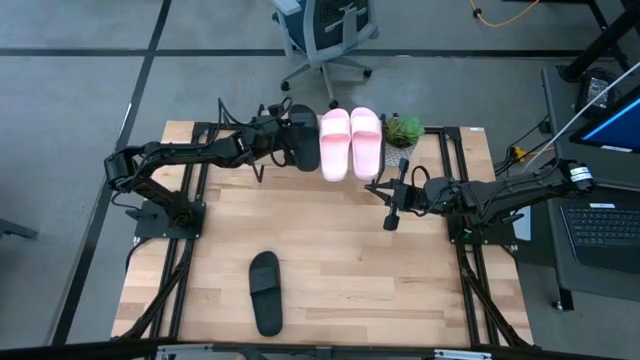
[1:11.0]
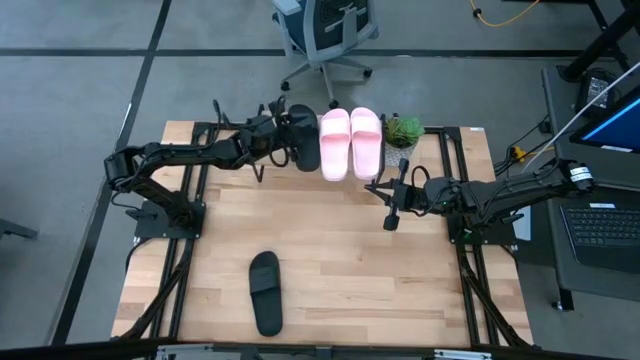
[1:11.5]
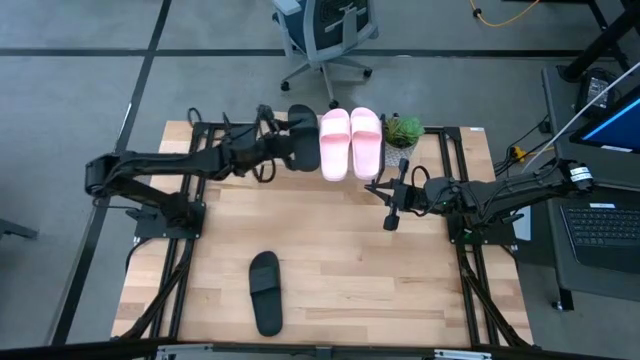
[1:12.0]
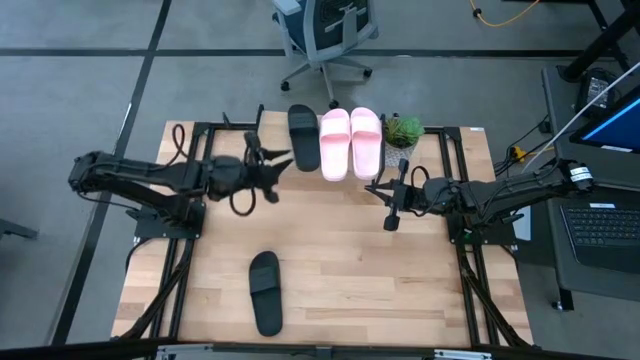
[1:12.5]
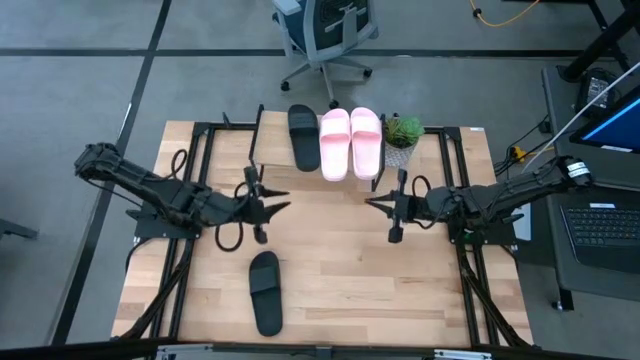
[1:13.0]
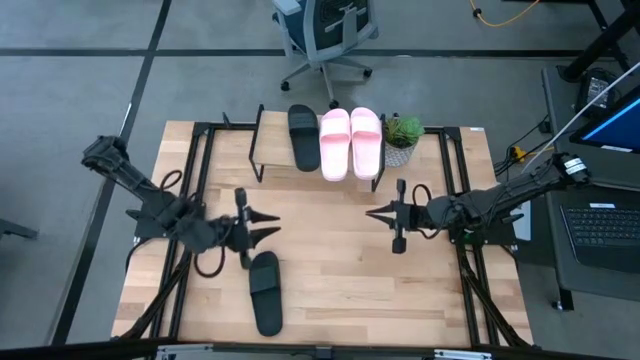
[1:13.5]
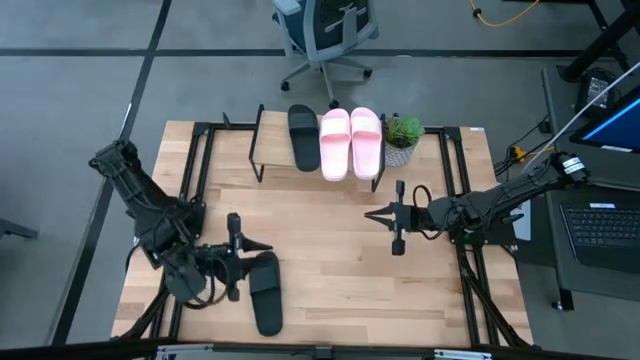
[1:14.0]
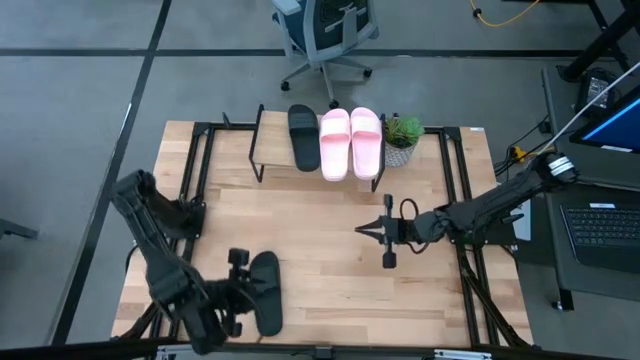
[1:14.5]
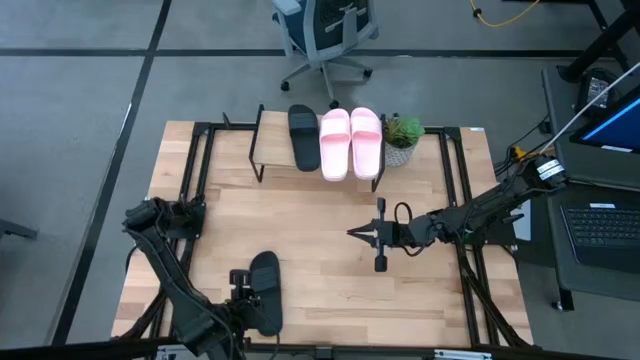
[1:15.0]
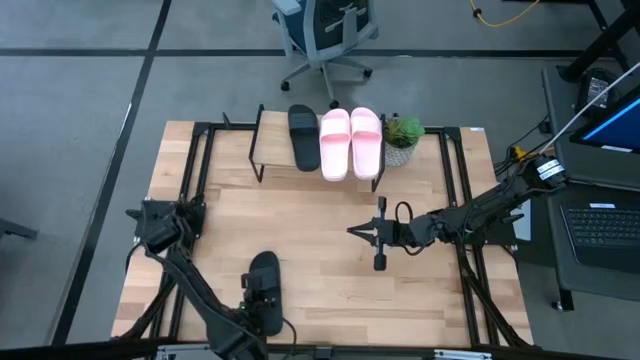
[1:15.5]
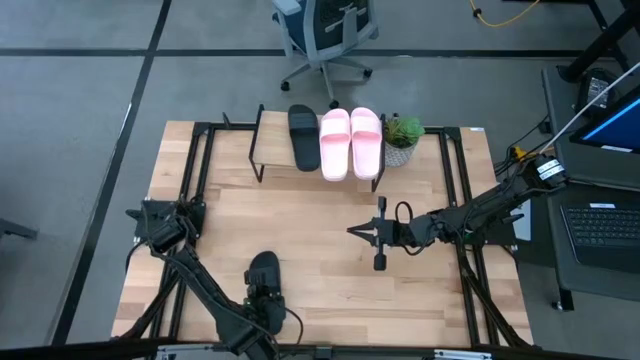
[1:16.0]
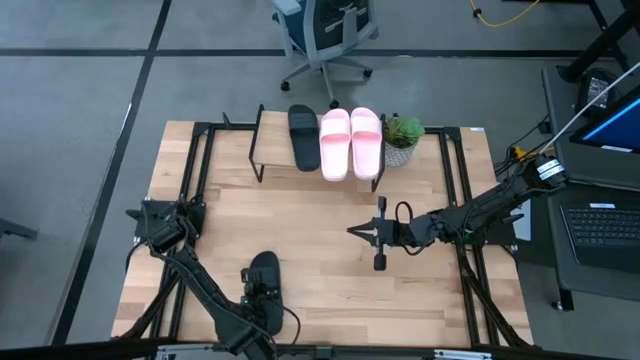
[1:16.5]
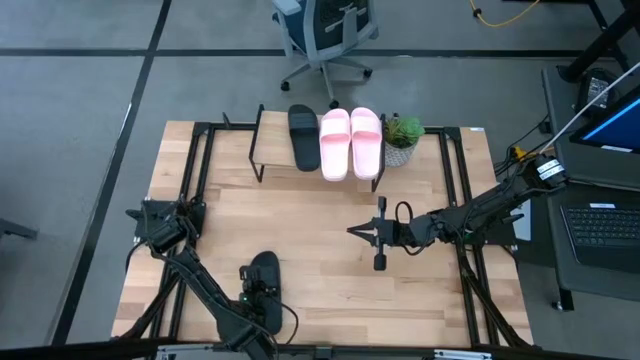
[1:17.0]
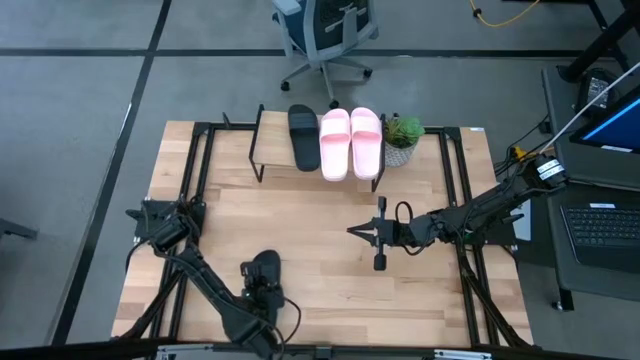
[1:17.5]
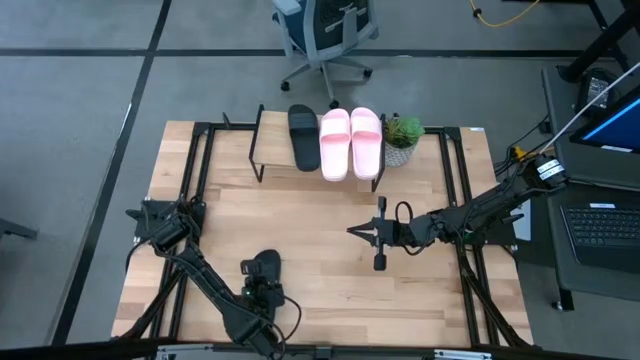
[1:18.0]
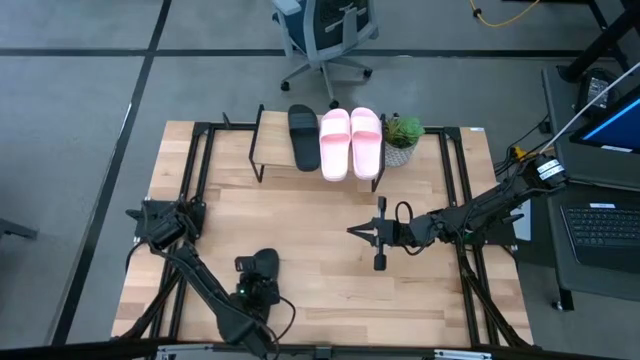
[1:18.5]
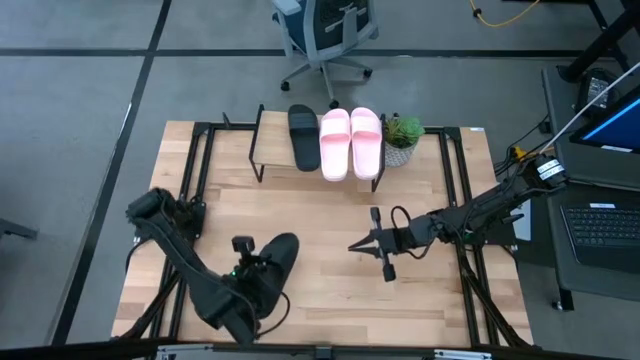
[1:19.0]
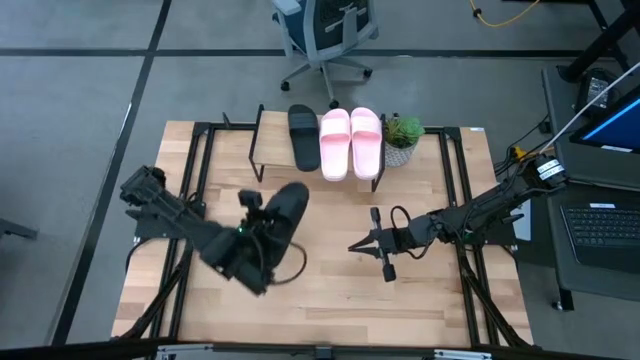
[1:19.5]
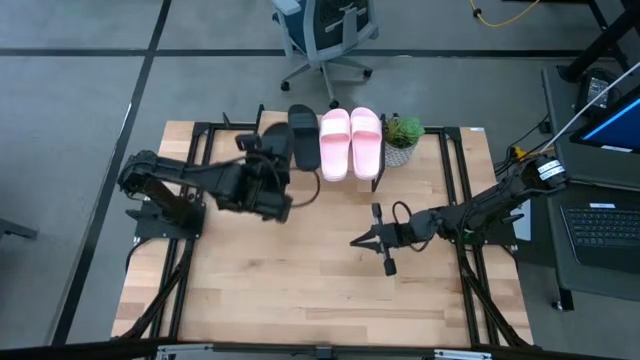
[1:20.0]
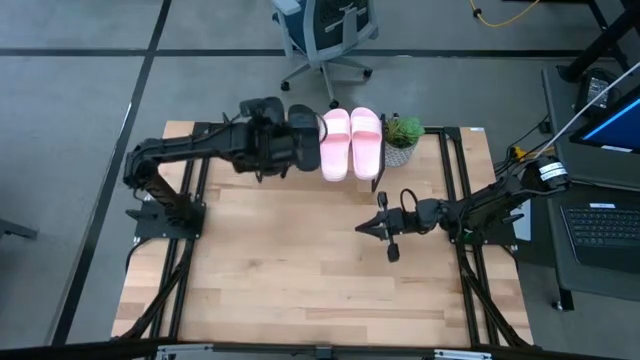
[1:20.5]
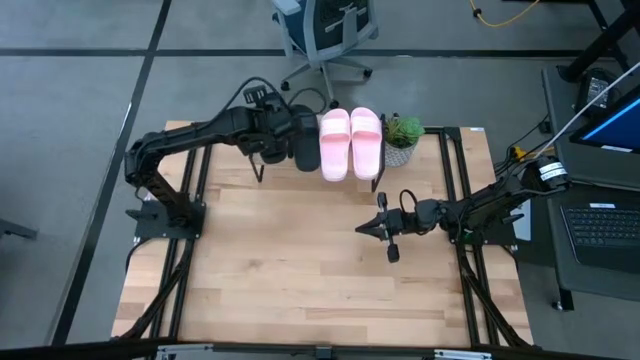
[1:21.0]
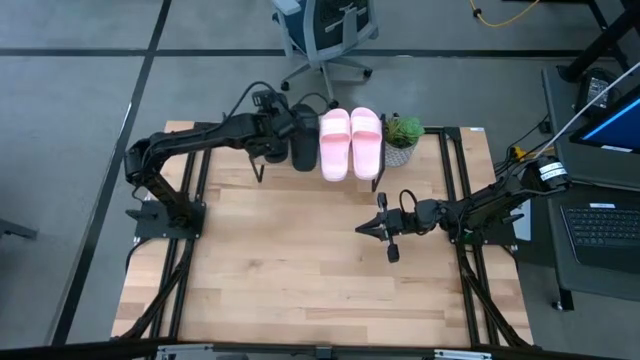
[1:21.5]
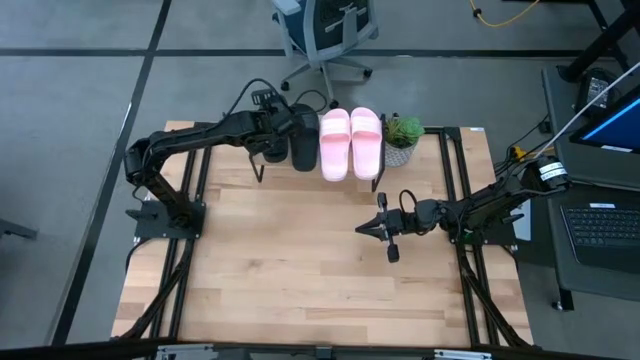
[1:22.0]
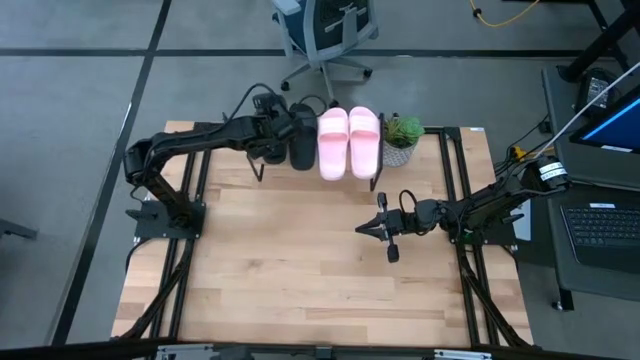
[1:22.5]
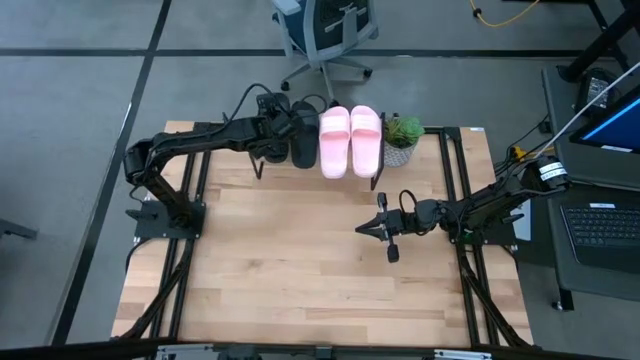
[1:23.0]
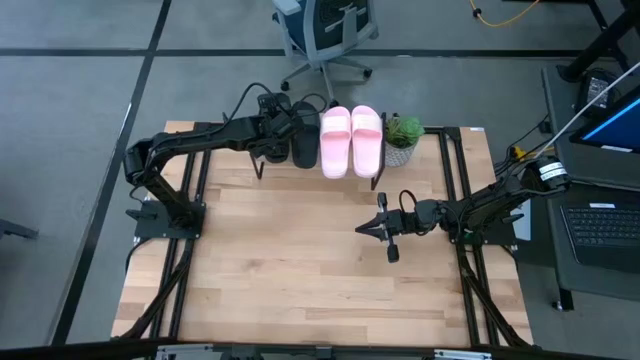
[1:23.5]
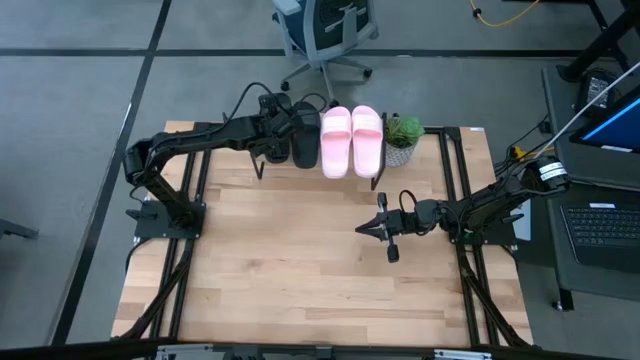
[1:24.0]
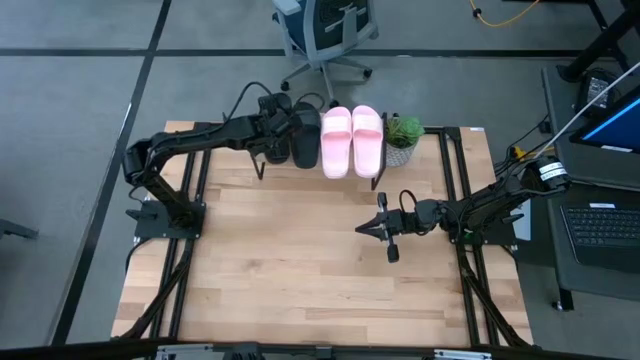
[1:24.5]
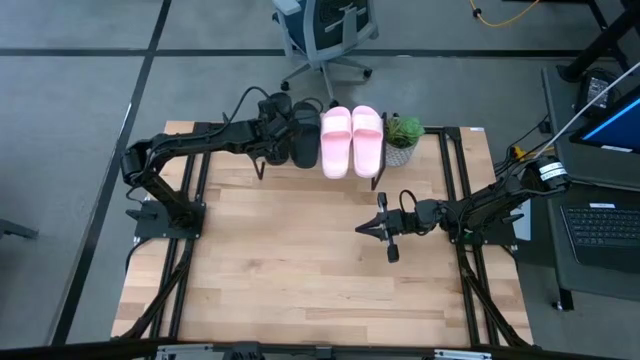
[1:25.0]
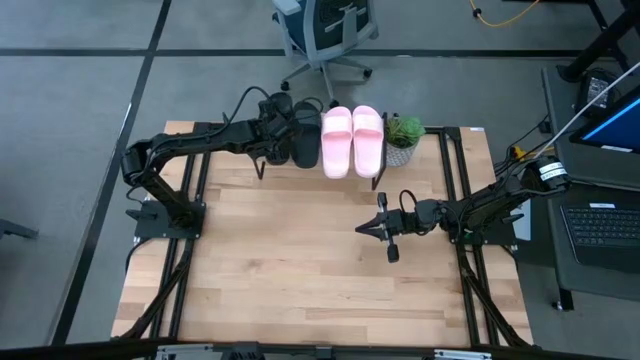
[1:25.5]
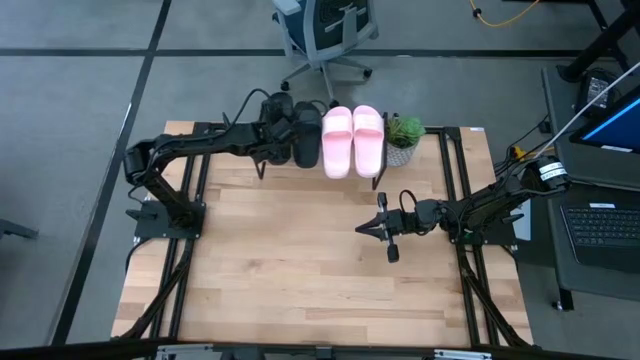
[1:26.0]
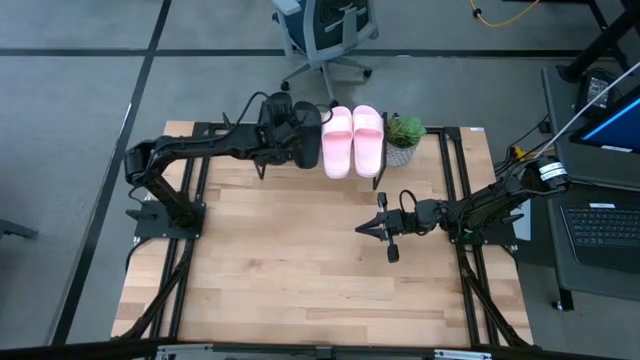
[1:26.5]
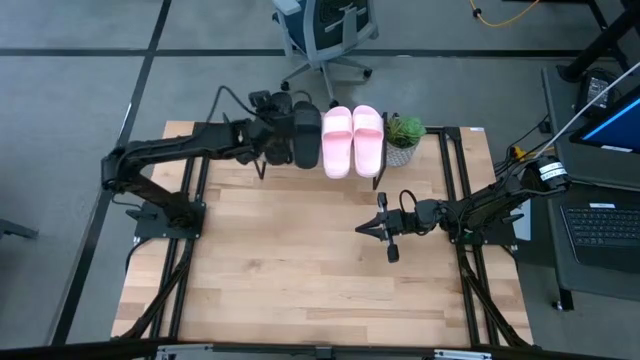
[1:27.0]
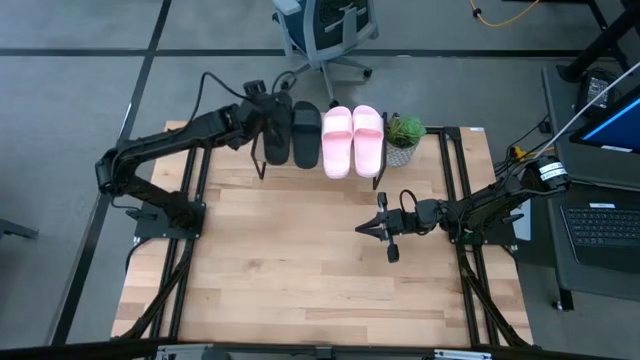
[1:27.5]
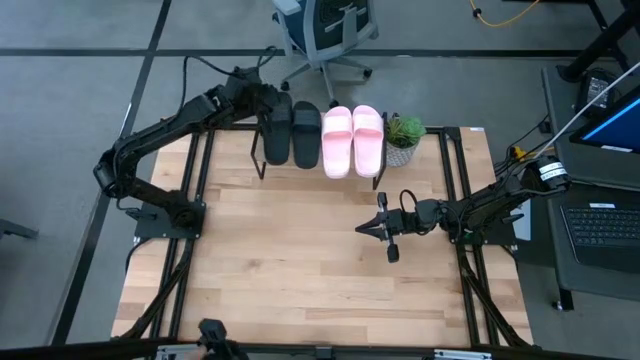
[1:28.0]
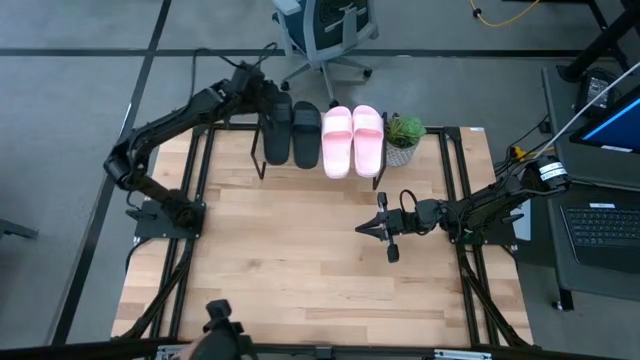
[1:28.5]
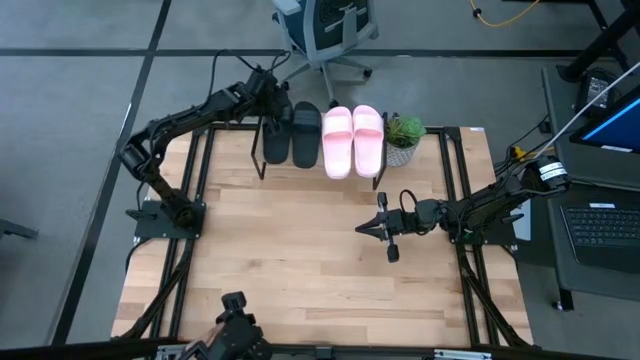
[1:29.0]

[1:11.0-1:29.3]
Task: Pick and place slides into the shelf
Put the black slides on the shelf

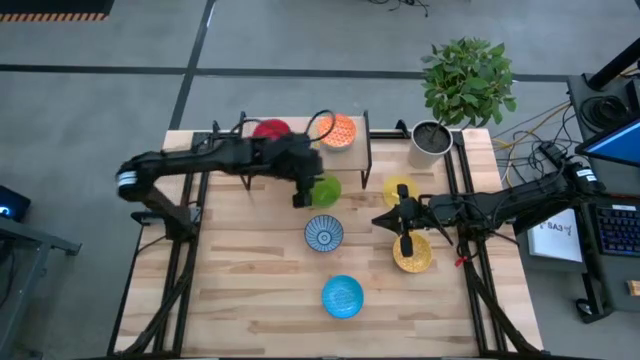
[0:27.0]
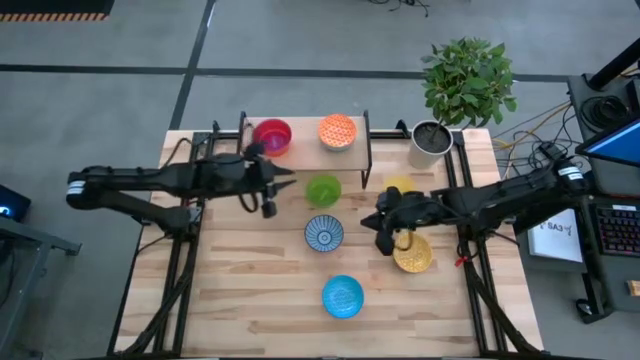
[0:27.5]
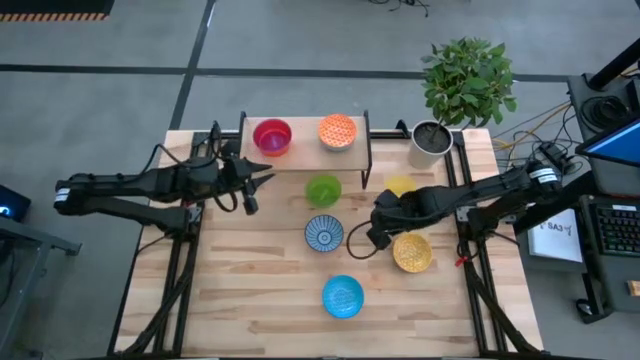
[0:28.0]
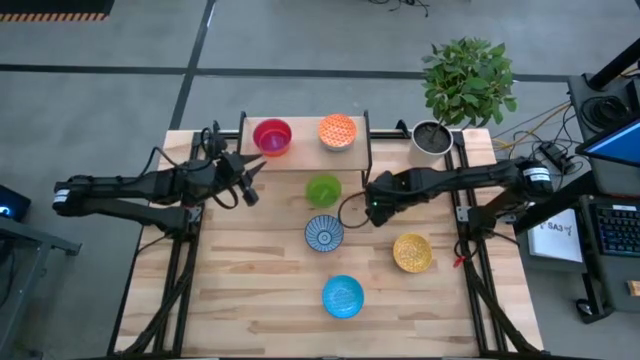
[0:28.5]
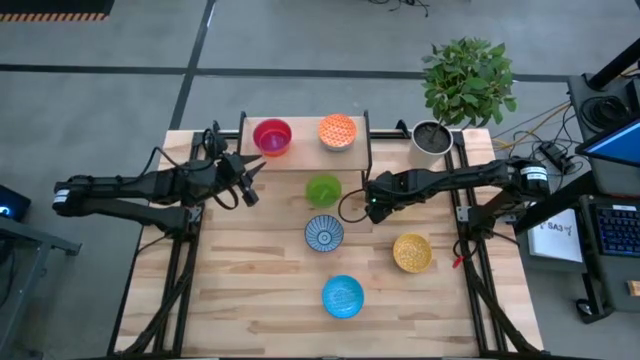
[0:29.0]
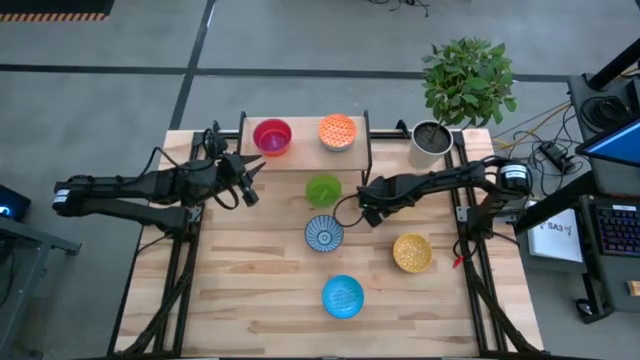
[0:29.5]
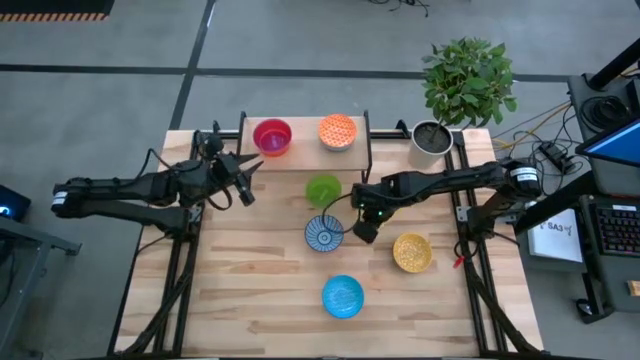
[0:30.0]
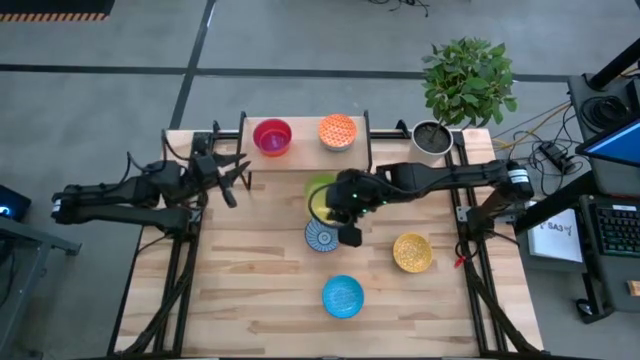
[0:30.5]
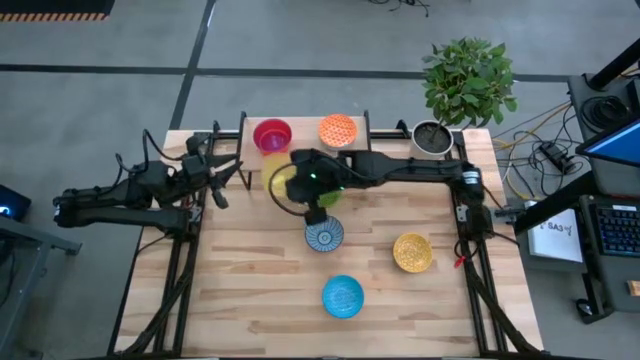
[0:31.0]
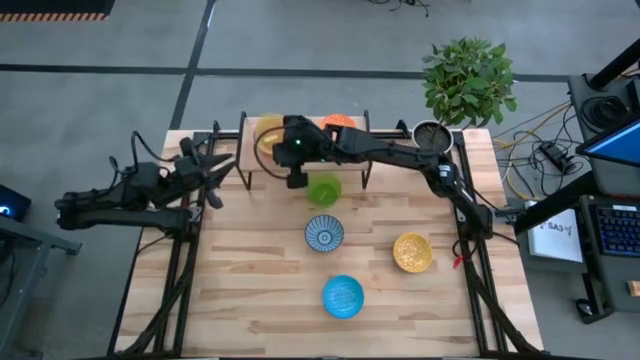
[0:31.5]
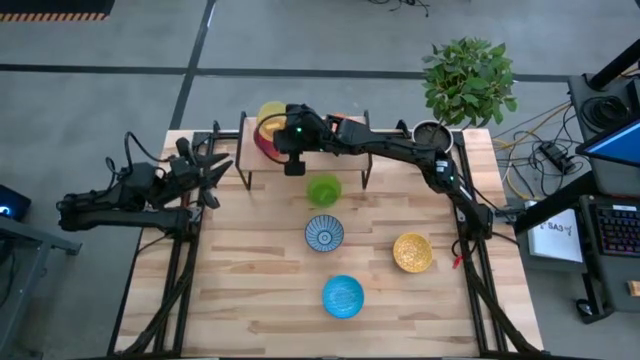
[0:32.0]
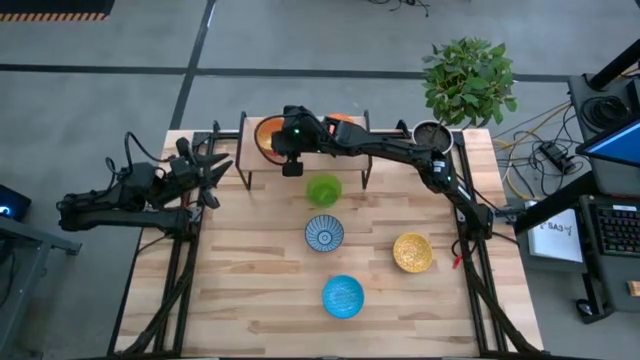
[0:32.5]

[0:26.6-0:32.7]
Task: Place and stack bowls onto a shelf
Stack the transparent yellow bowl on top of the transparent violet bowl on the shelf
